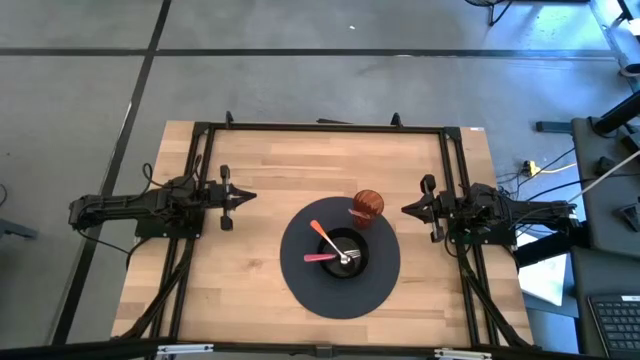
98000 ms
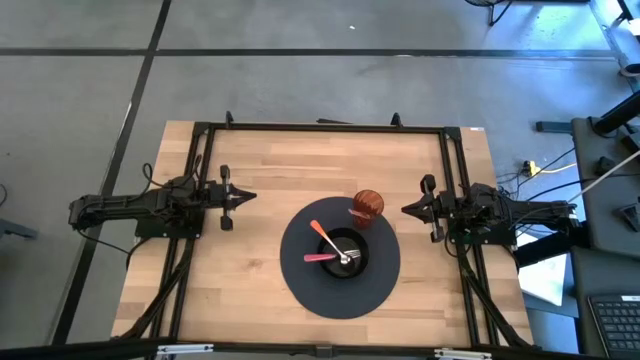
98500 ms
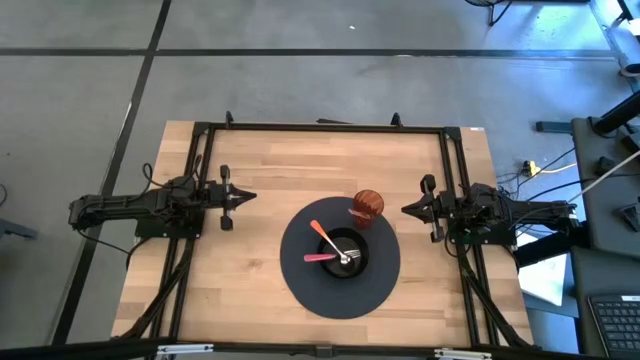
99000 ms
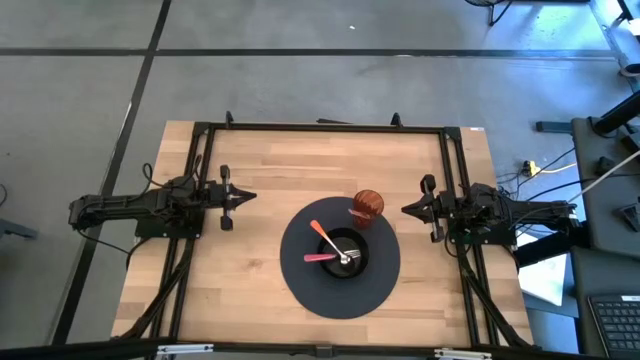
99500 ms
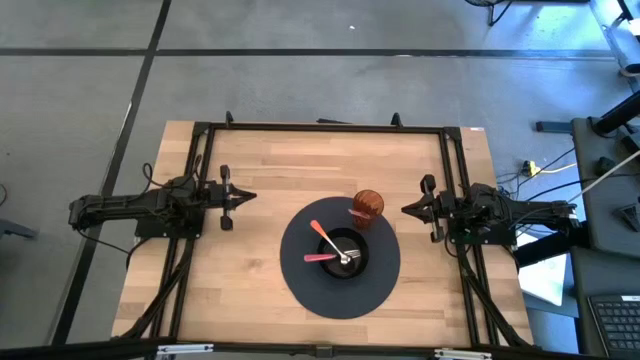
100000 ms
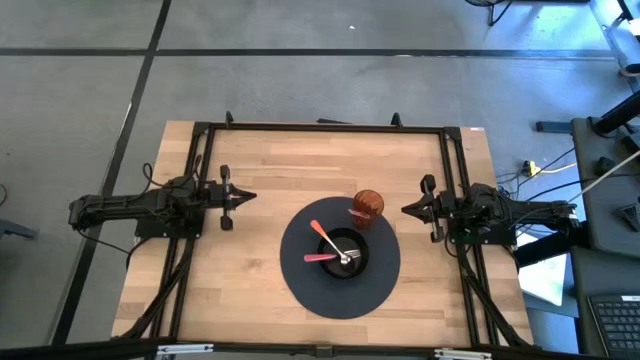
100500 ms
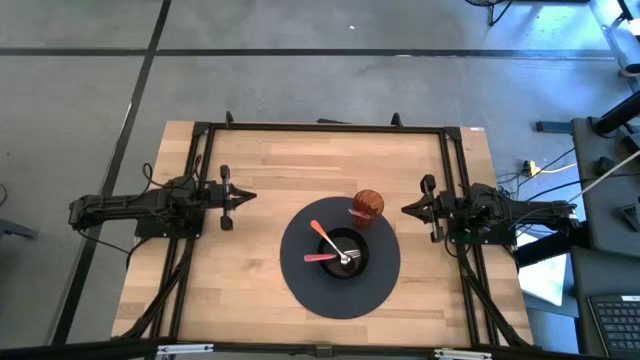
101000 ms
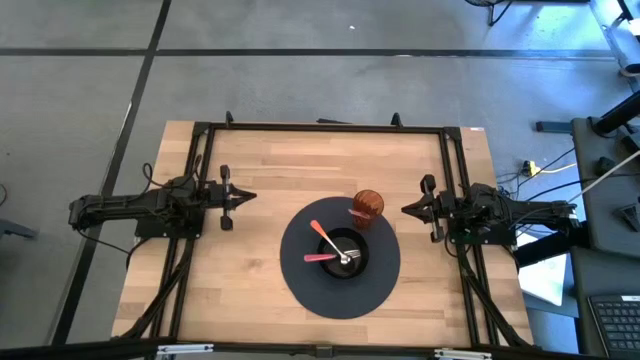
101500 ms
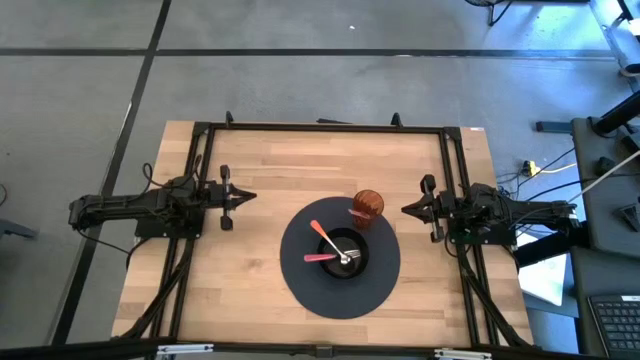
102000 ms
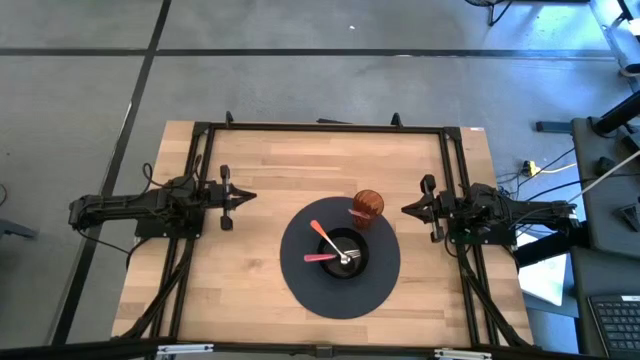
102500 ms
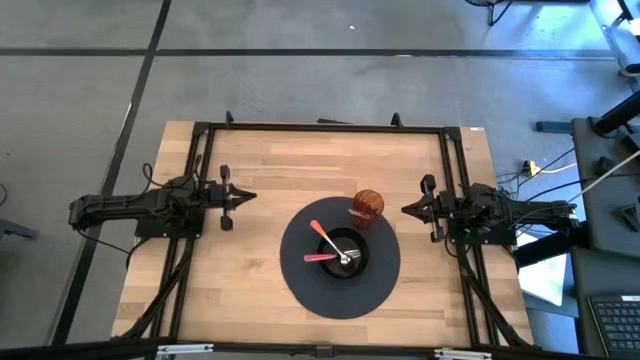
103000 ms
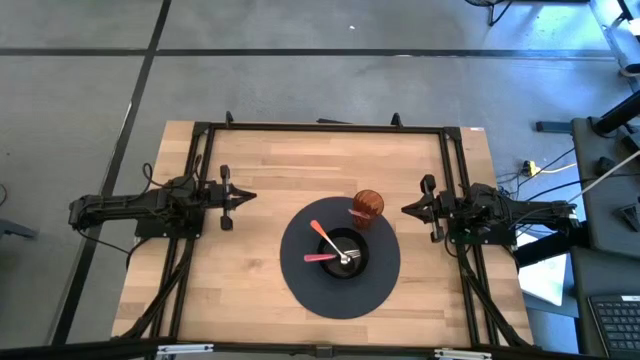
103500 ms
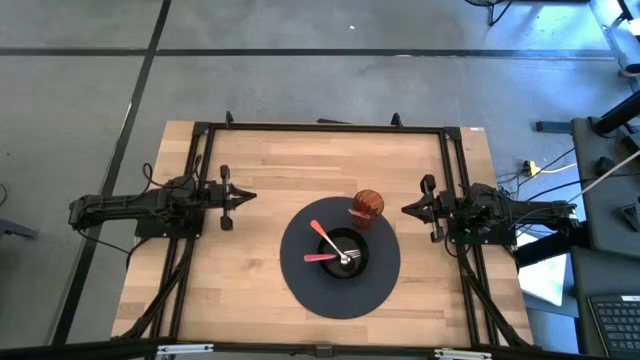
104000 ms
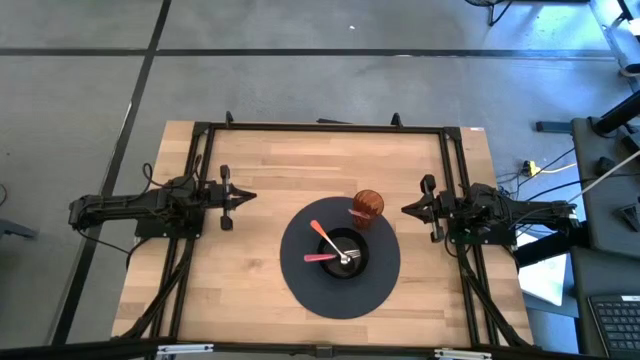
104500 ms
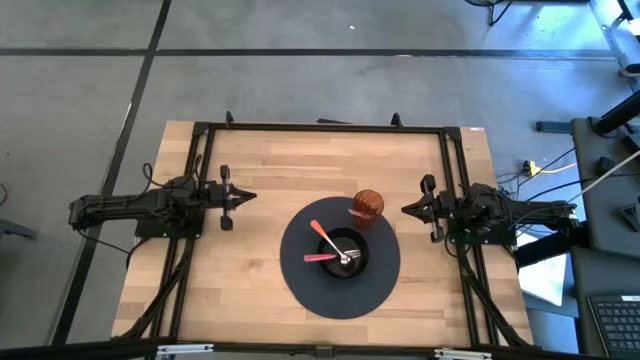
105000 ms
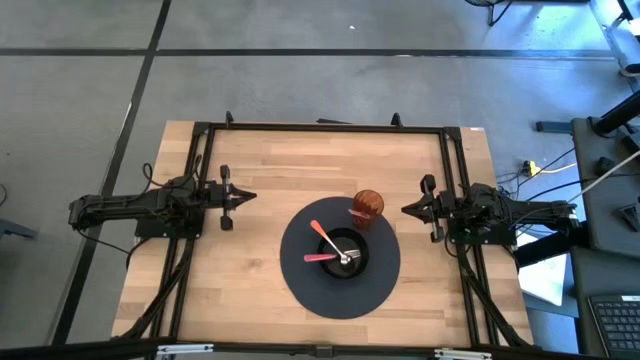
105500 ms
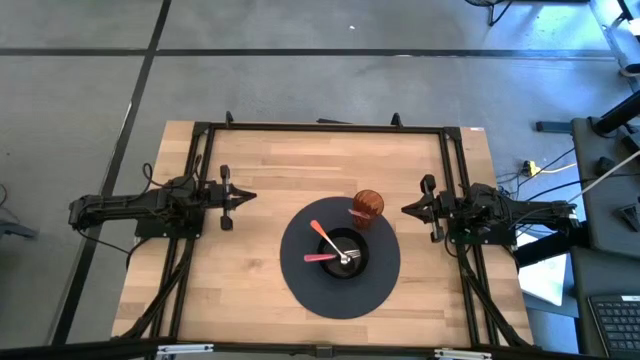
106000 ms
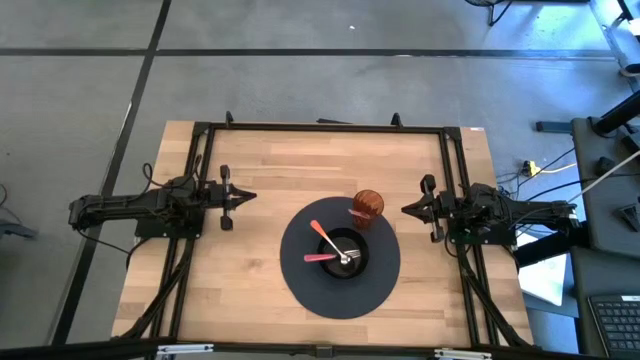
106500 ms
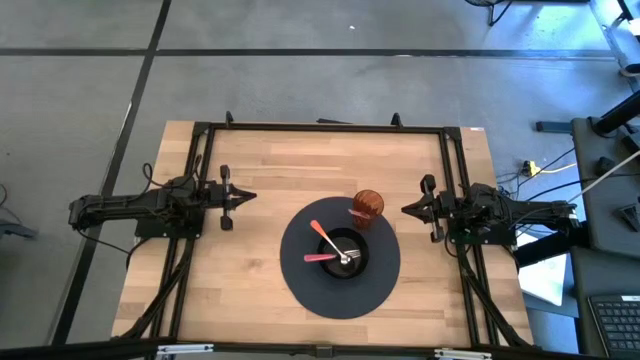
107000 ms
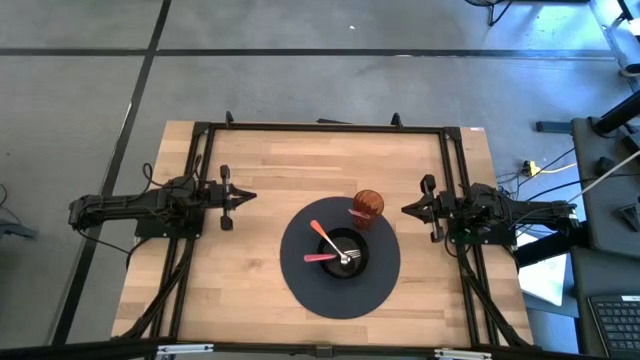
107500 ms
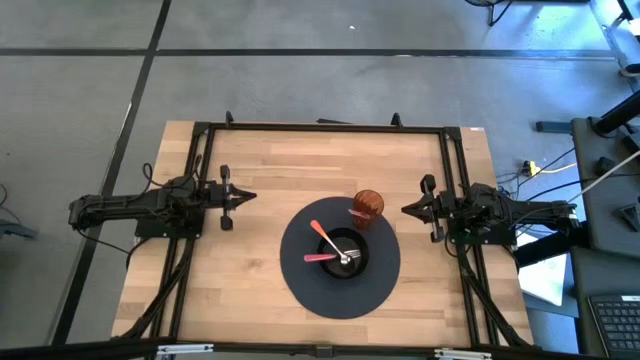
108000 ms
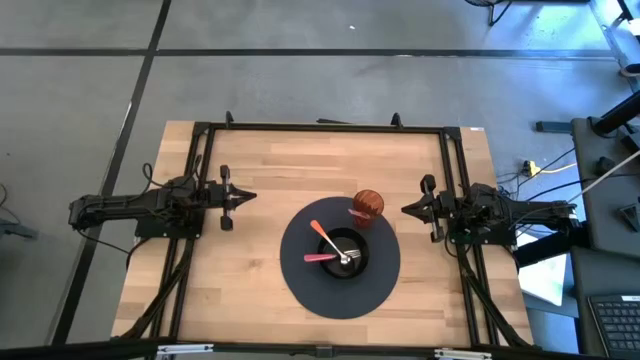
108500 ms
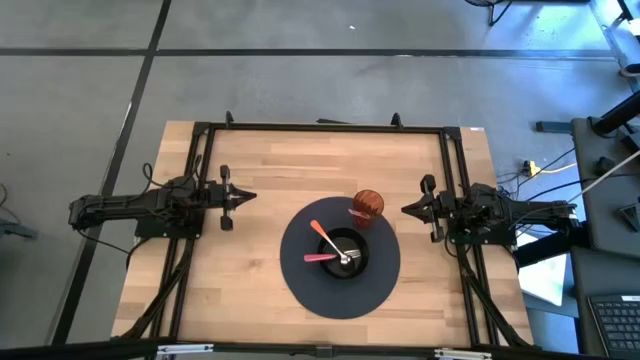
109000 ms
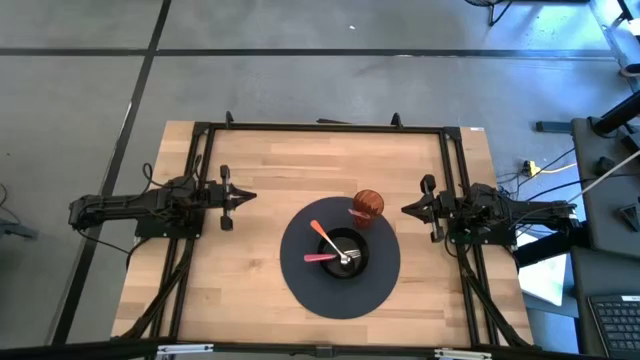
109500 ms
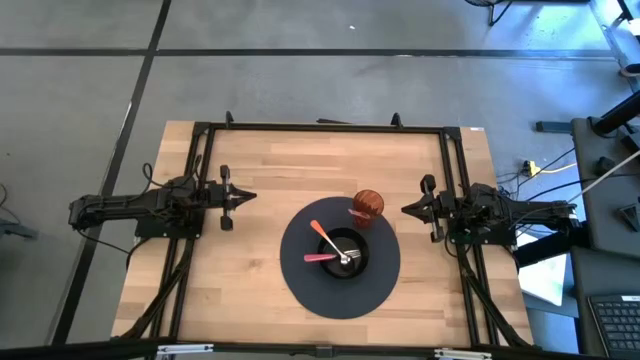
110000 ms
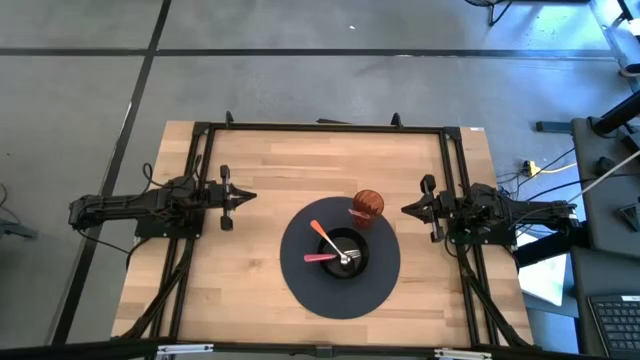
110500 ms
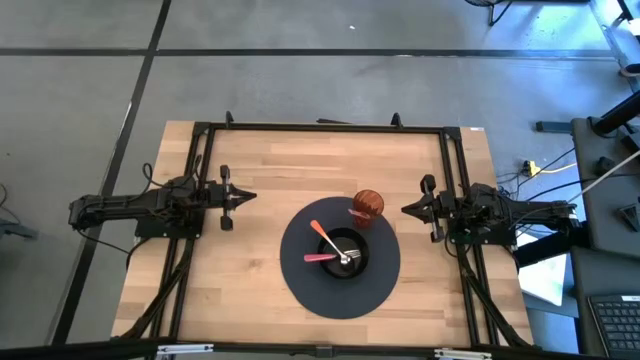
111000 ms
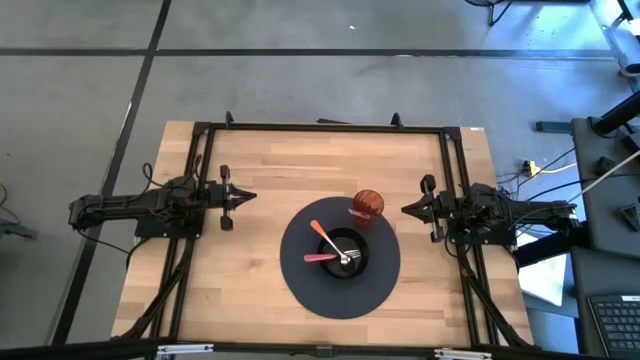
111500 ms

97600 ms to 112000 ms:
Task: Pick & Place Utensil
Return to Home position

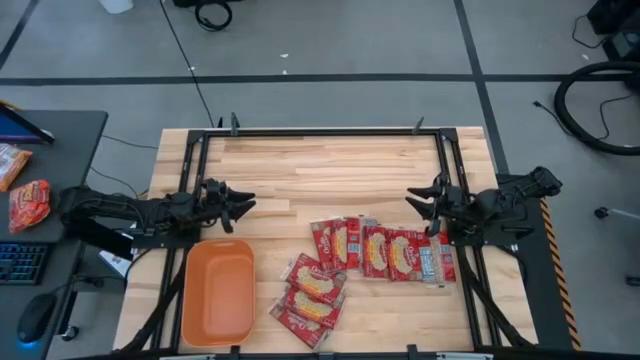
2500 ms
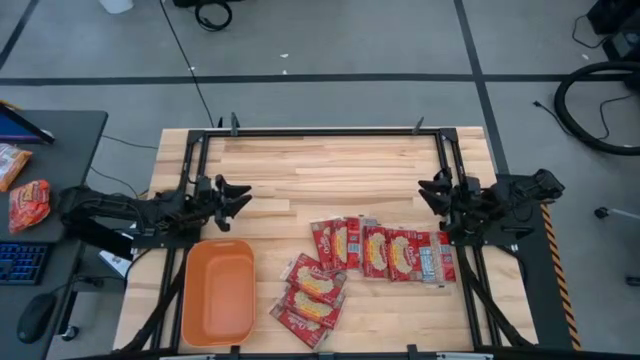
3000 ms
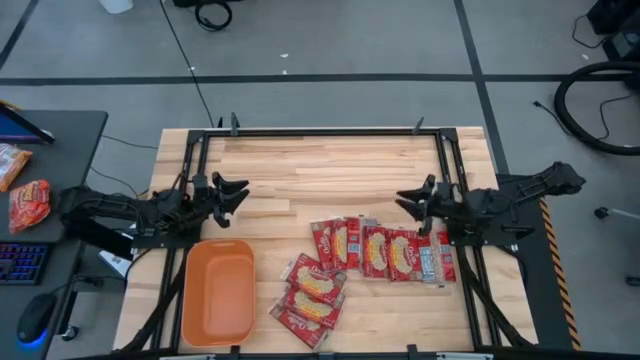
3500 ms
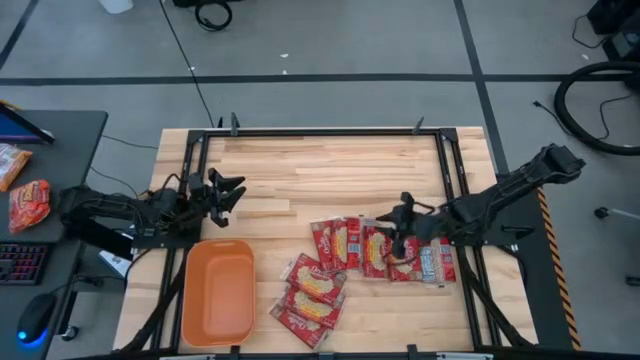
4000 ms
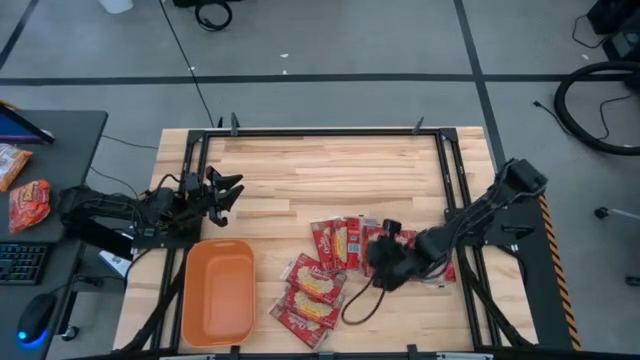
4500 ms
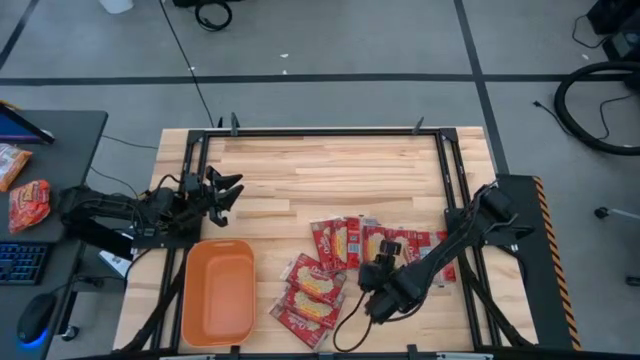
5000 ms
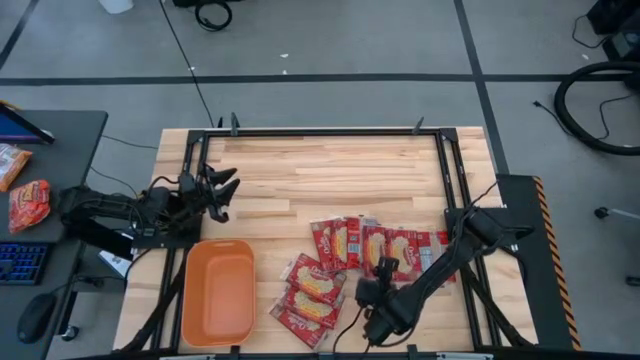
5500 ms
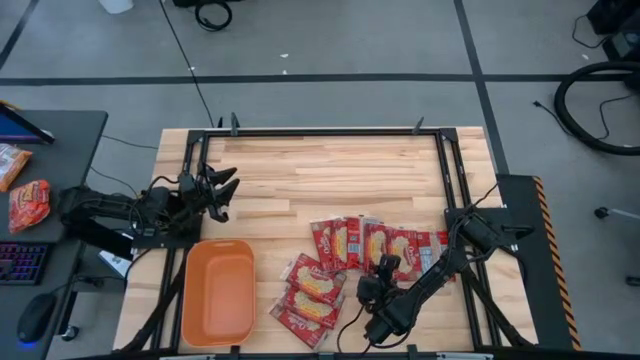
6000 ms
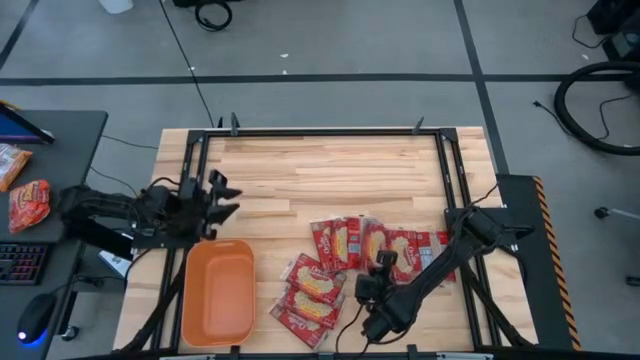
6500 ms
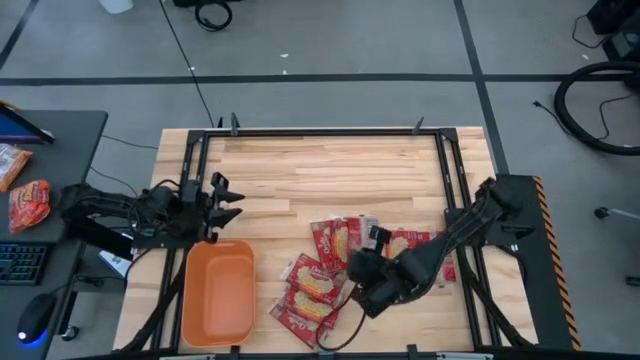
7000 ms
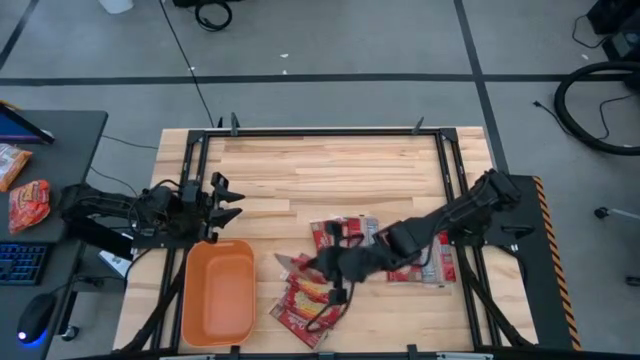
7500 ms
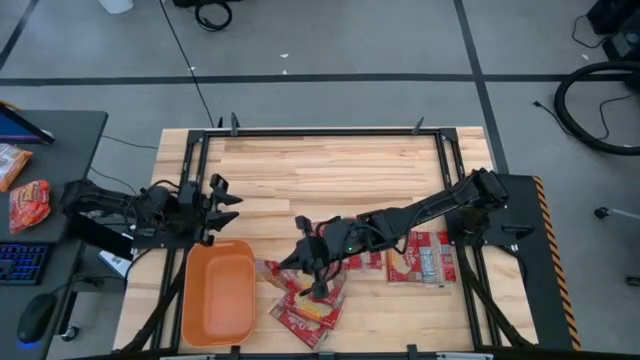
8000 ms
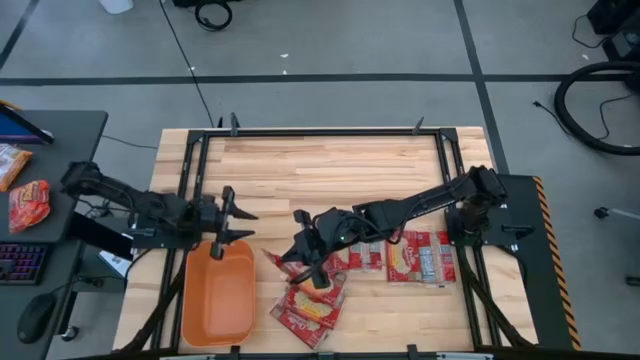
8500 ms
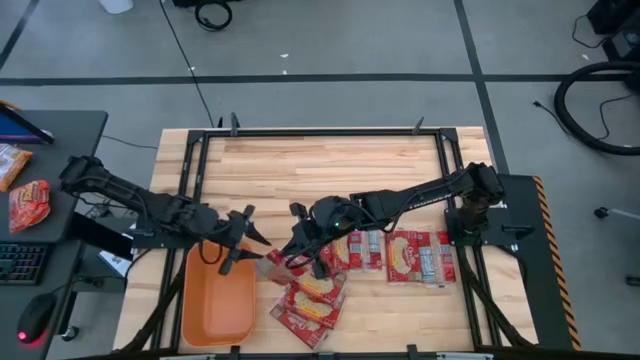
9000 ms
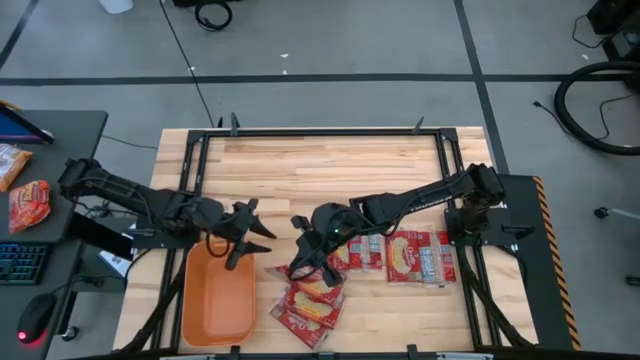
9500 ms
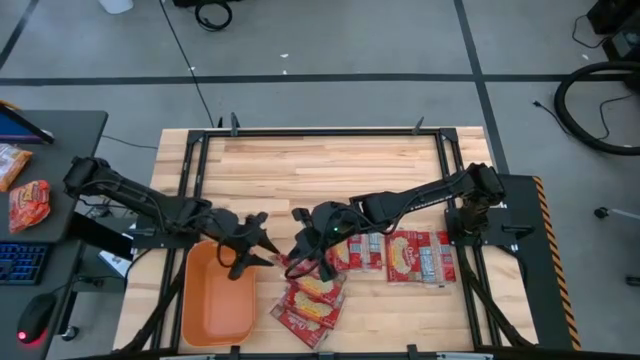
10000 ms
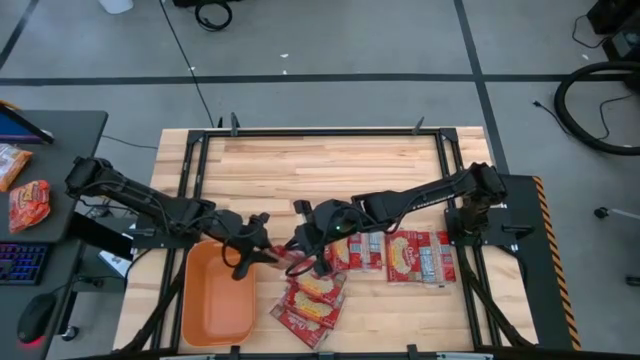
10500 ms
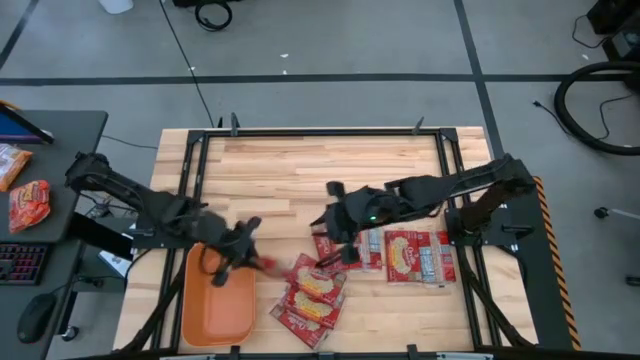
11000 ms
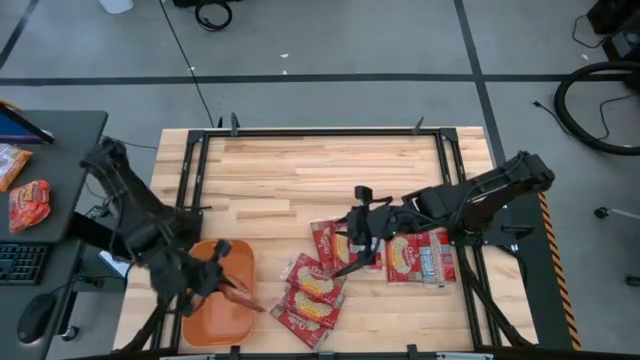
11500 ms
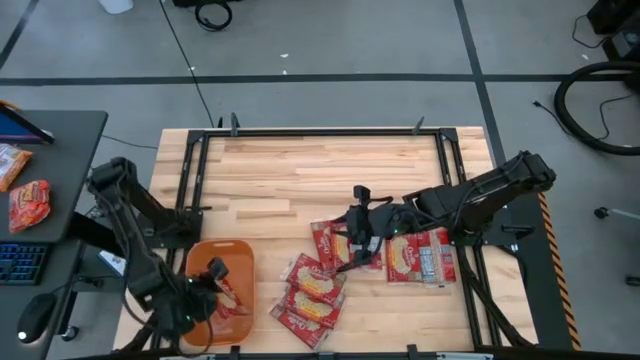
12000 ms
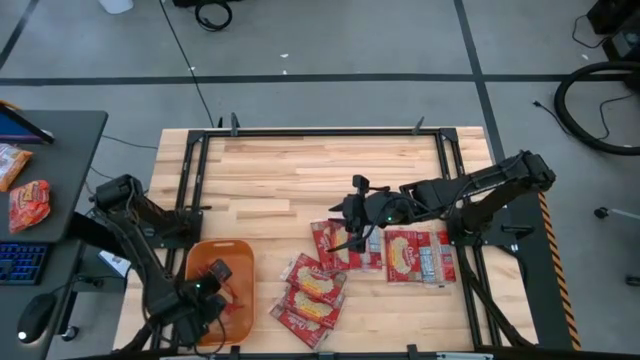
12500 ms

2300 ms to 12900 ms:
Task: Sort popcorn bags into baskets
Put the popcorn bag into the orange bin
